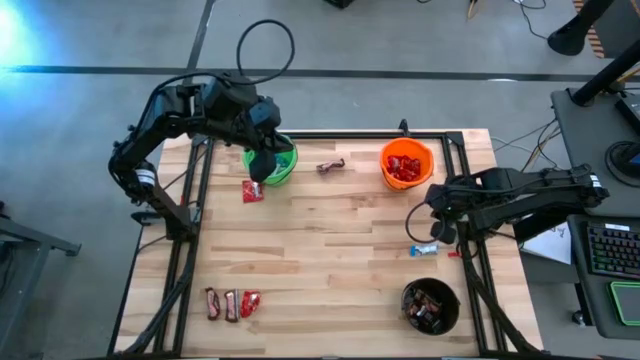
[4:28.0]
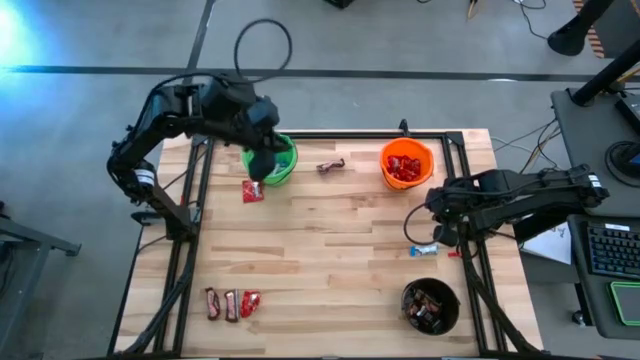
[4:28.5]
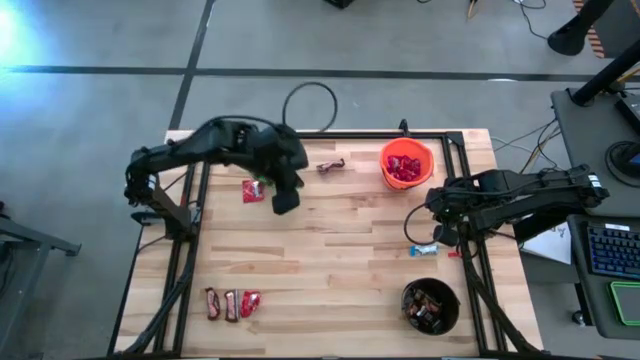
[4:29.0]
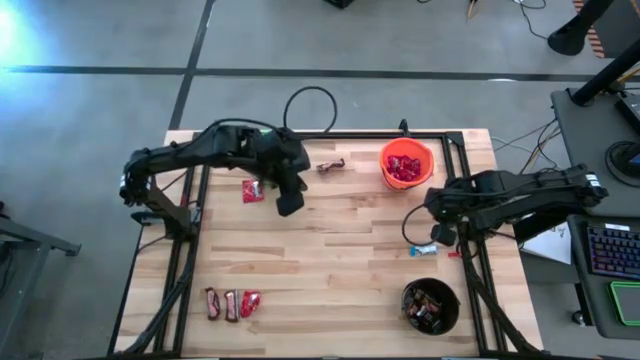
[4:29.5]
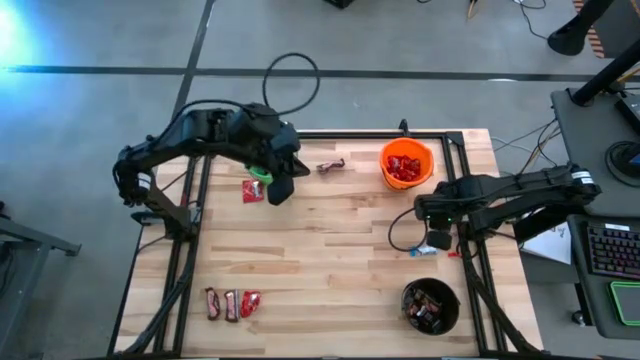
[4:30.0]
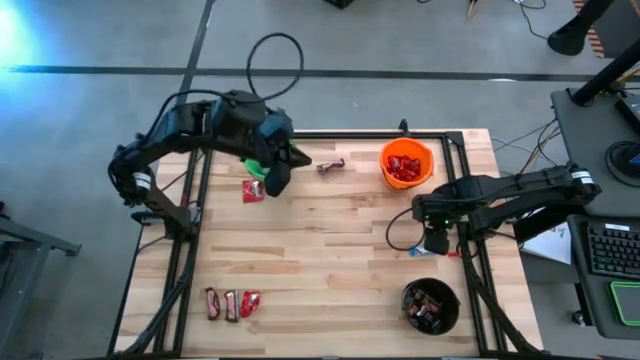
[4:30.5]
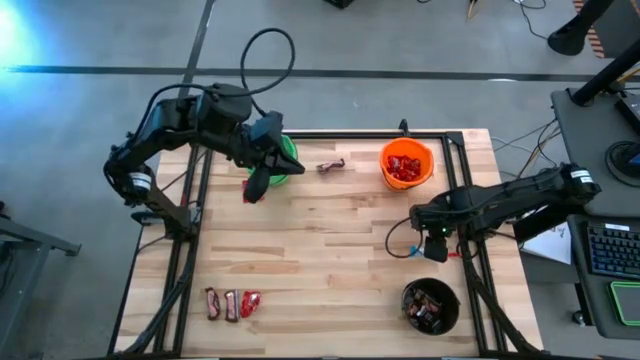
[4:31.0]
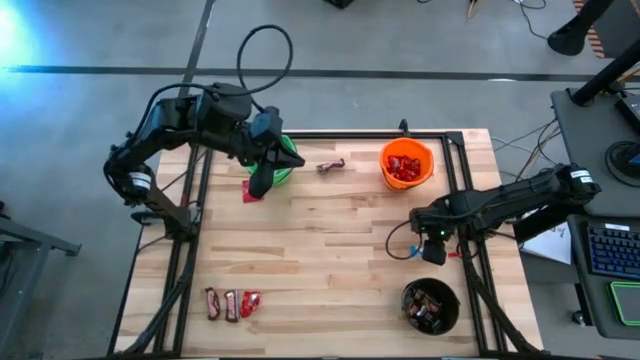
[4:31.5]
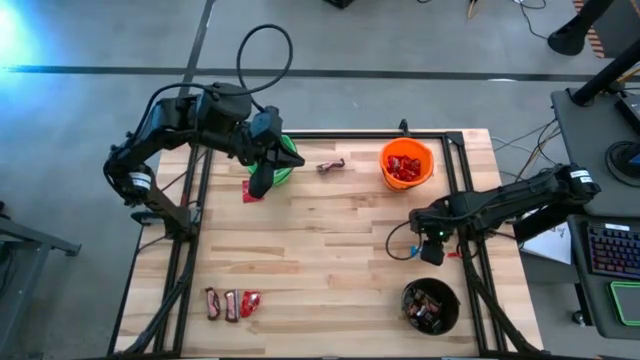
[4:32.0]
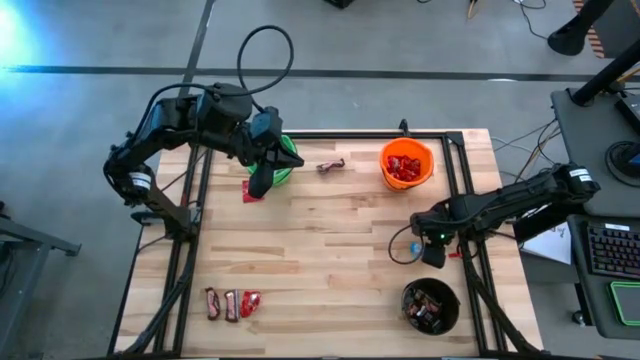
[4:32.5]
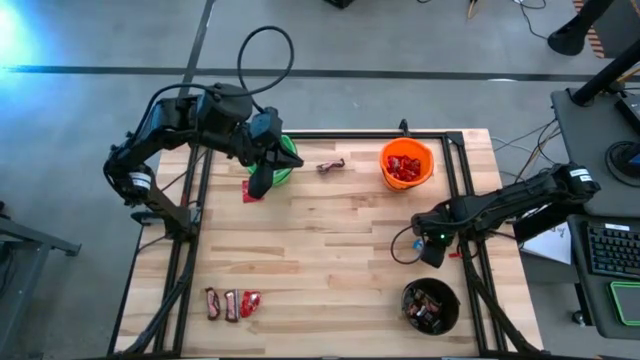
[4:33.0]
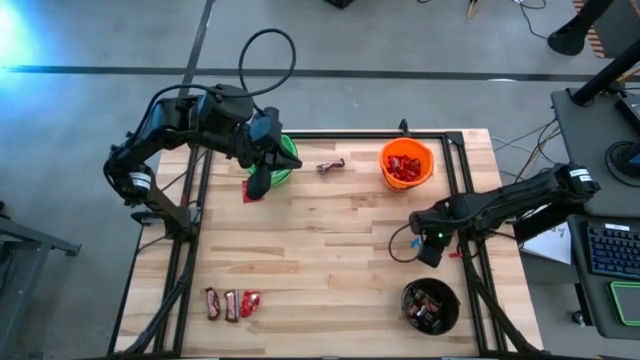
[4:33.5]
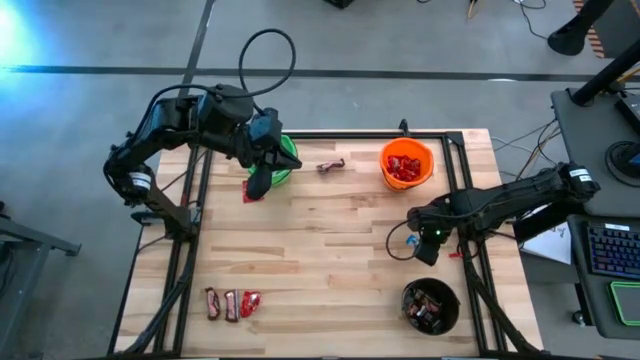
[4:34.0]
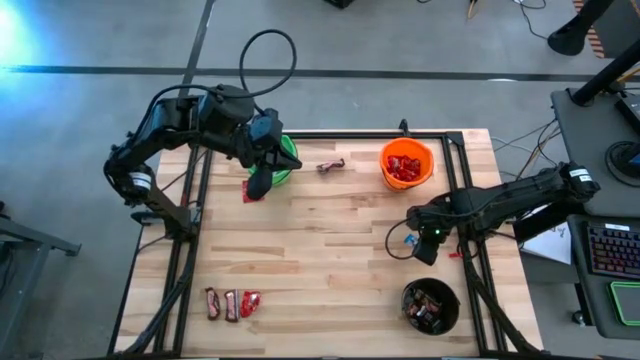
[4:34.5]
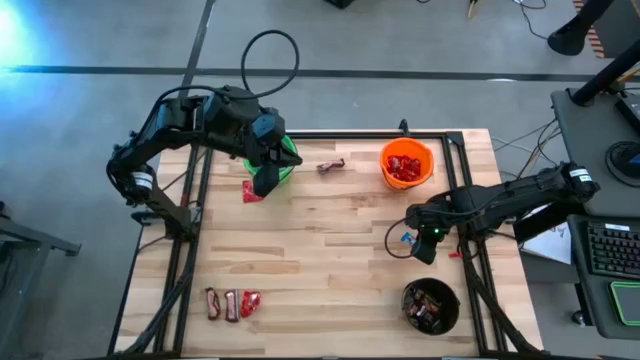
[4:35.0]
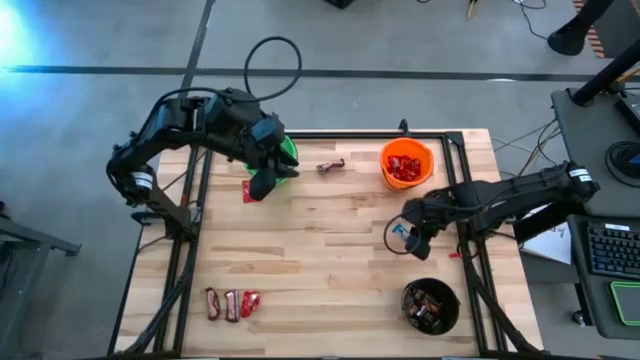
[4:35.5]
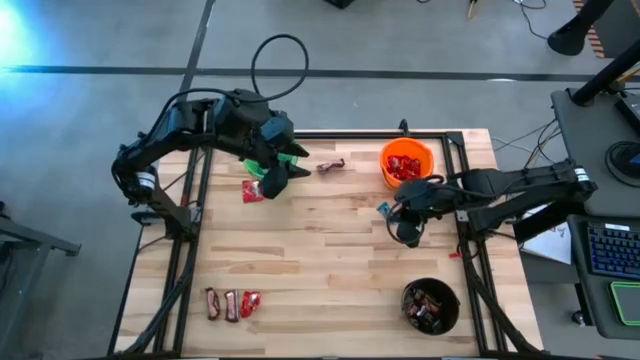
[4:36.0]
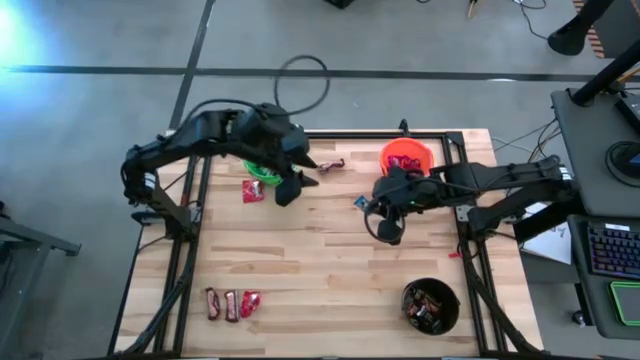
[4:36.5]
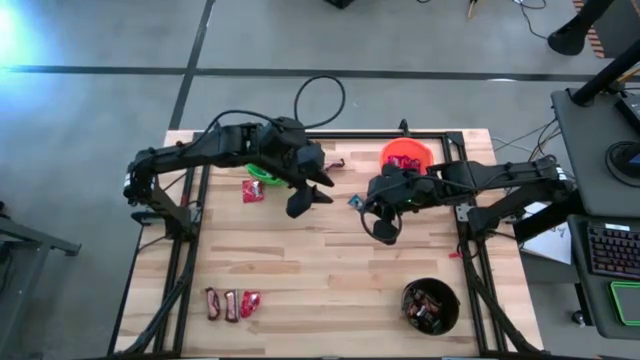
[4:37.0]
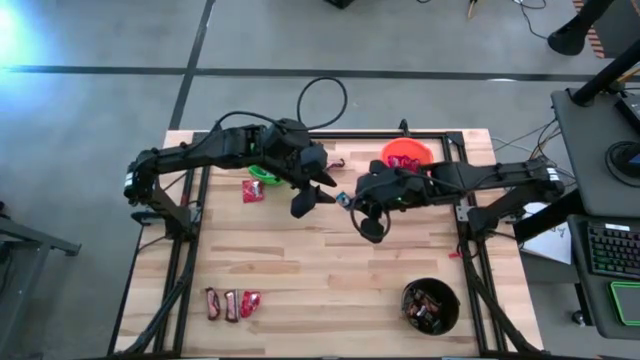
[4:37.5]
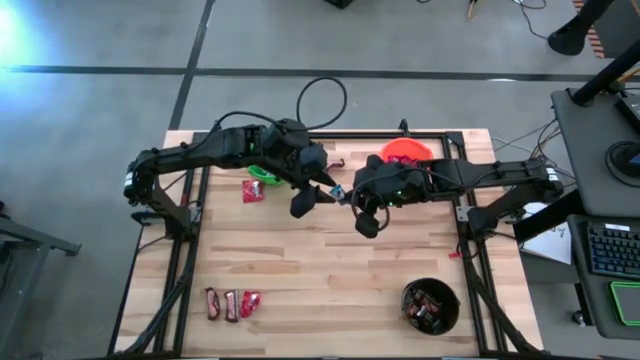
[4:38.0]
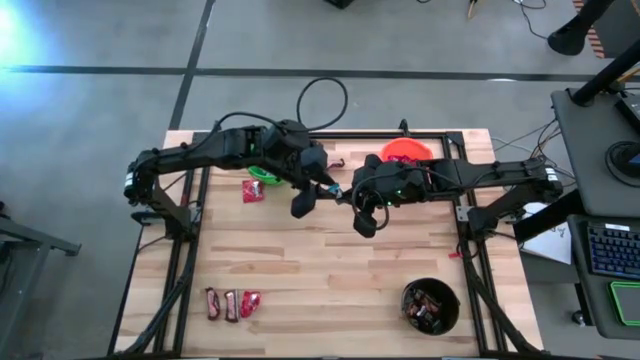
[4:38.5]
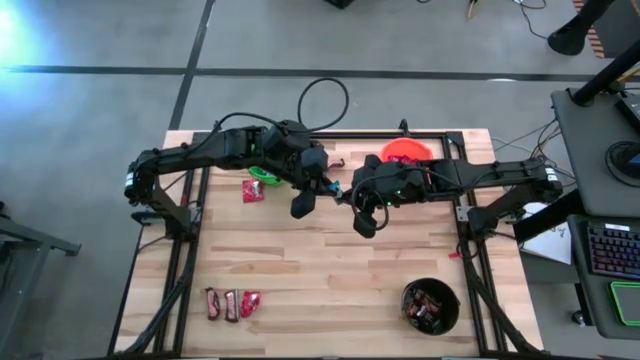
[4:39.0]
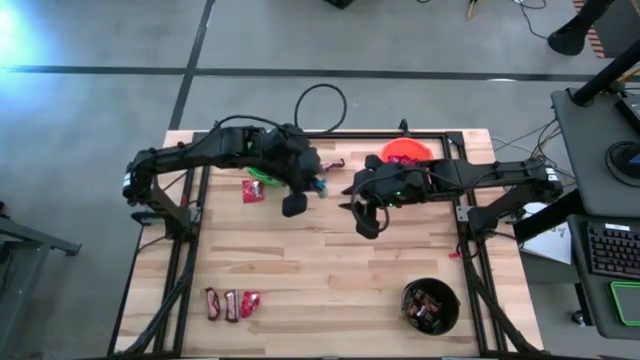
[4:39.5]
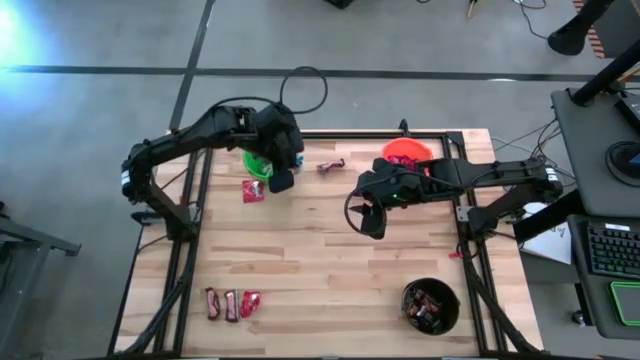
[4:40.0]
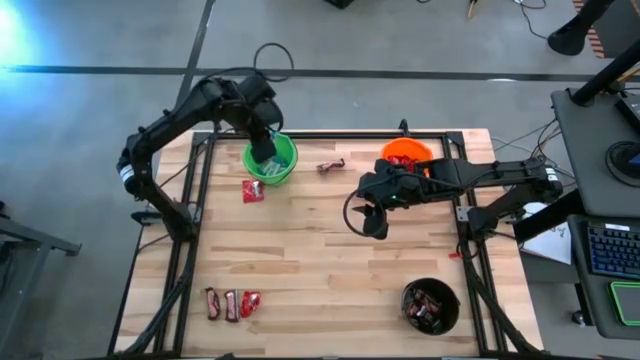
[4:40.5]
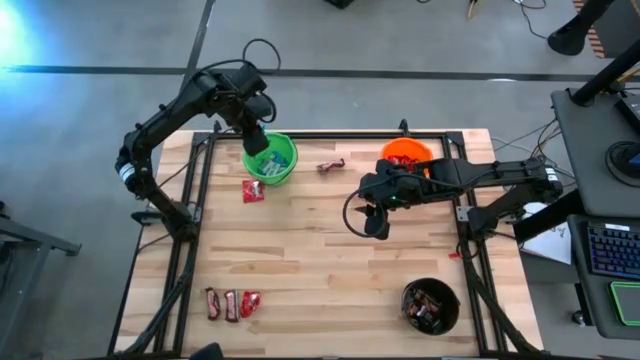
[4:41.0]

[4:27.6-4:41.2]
Task: Sort candy
Put the white candy into the green bucket

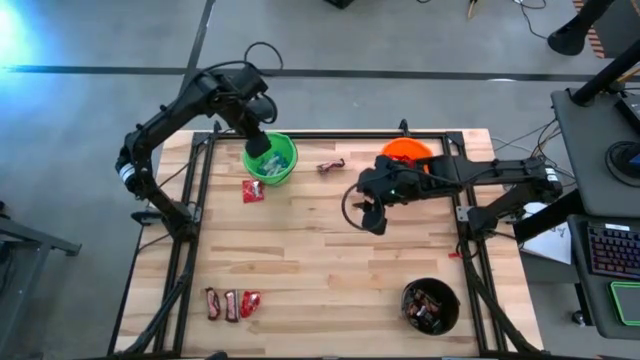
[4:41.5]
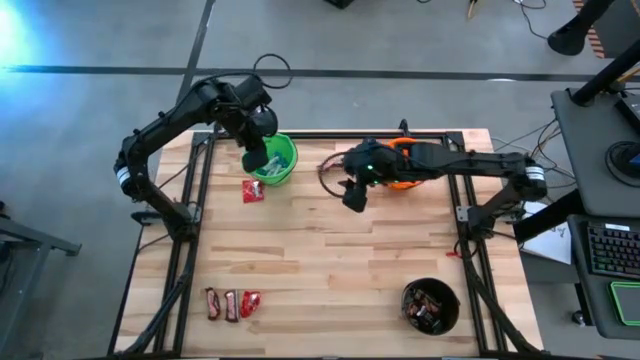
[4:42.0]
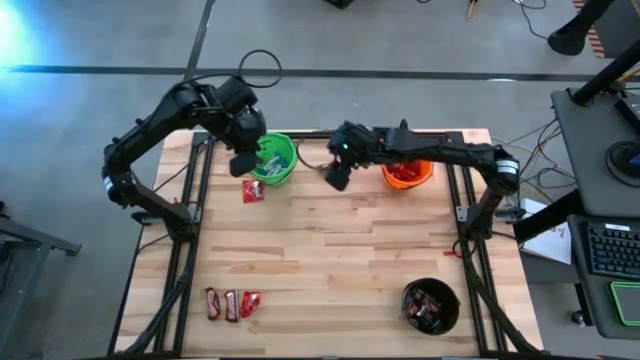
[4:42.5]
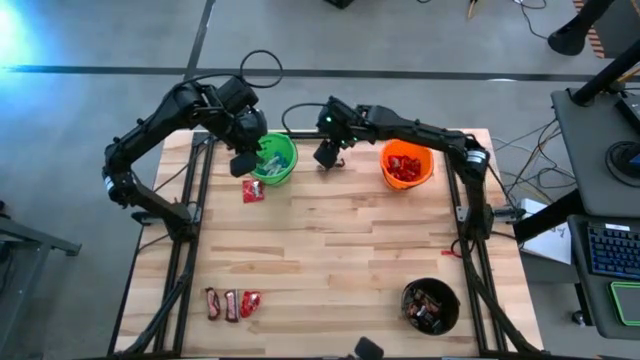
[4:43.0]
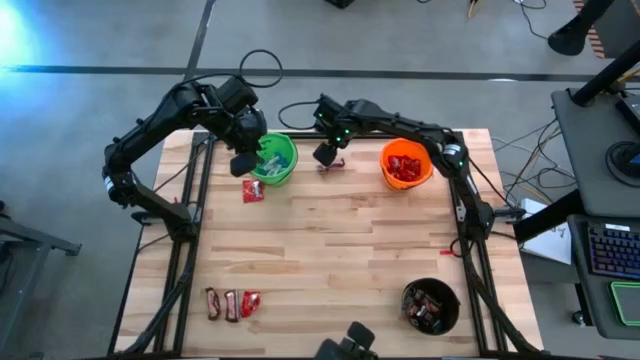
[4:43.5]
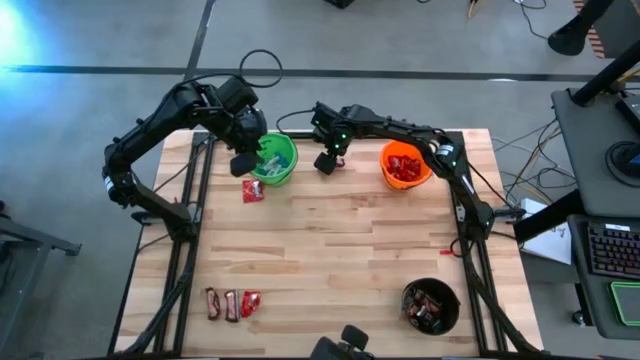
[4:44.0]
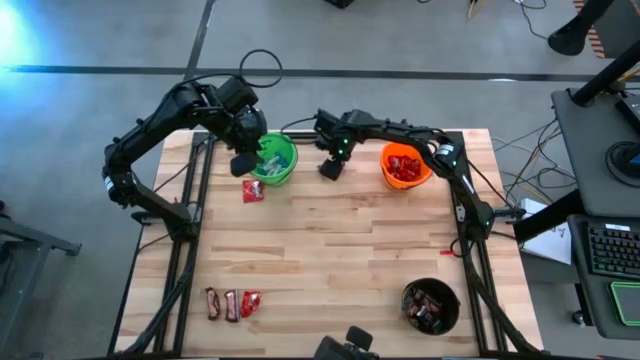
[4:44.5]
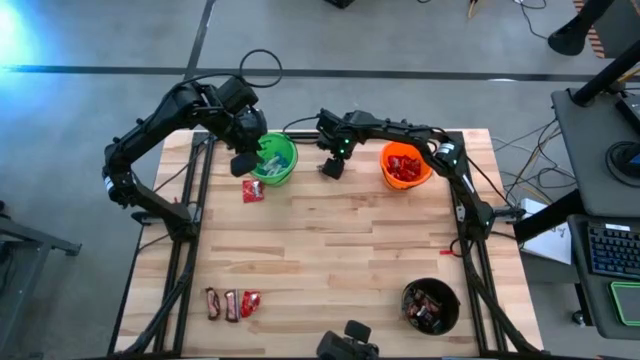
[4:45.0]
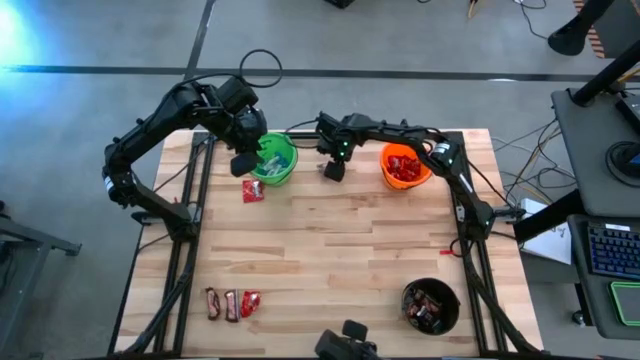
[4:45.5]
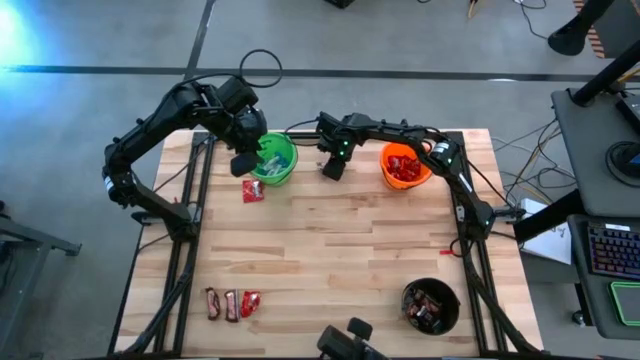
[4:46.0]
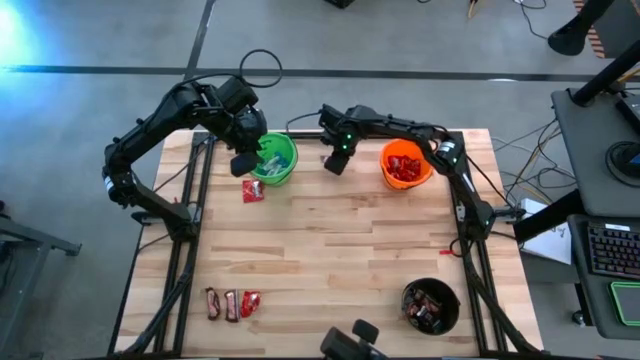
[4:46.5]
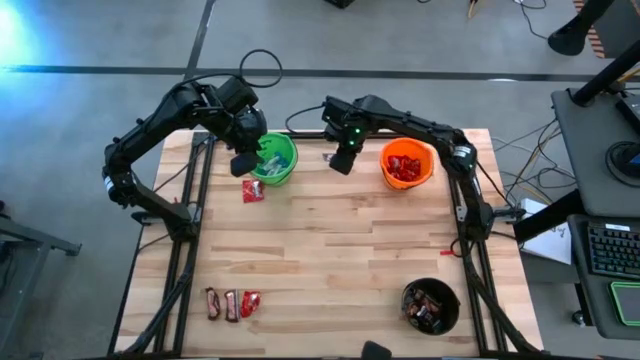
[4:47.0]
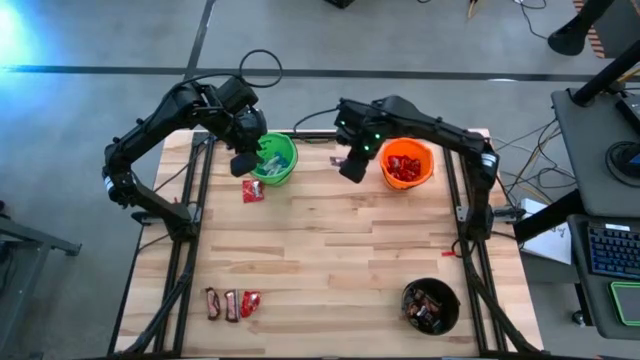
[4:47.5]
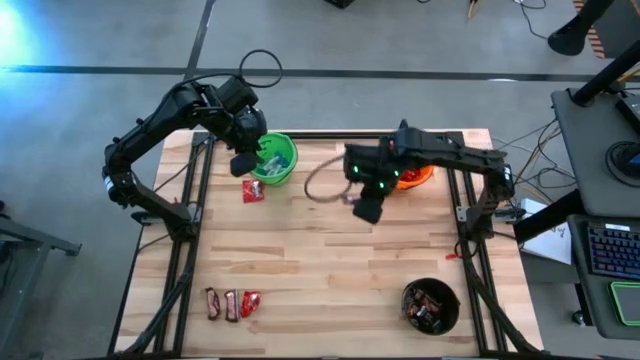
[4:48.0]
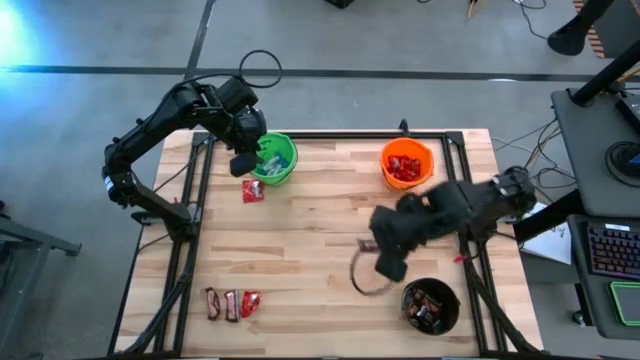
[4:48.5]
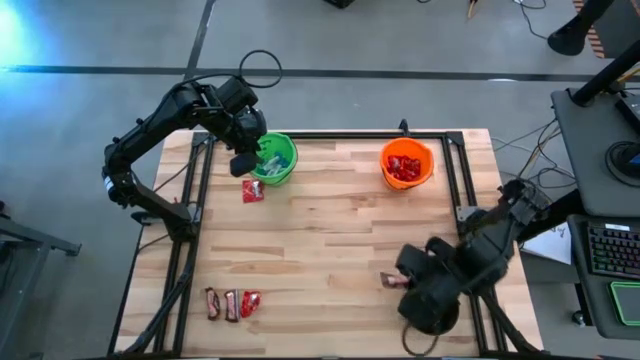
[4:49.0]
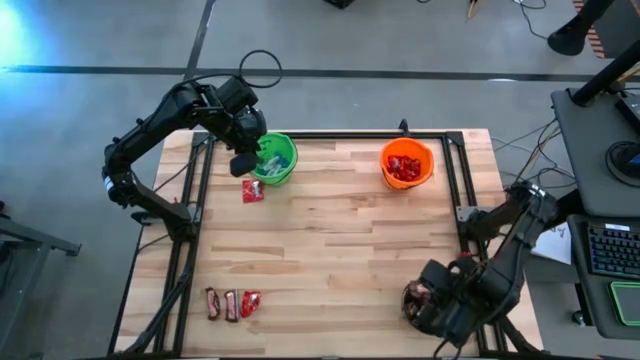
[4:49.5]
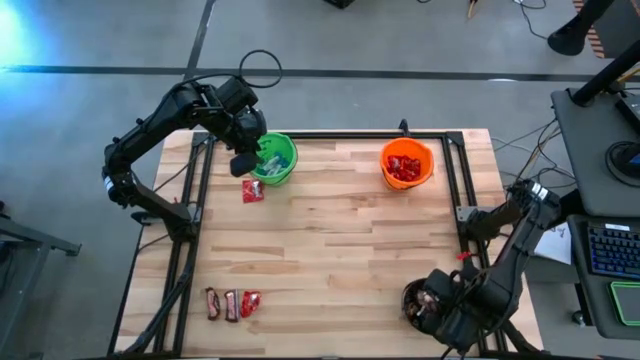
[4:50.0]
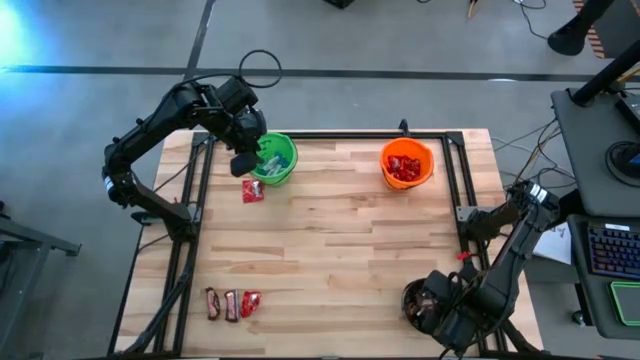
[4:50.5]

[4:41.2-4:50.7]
Put the brown candy into the black bucket
